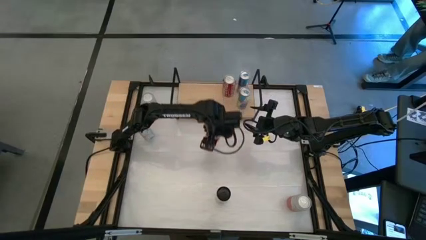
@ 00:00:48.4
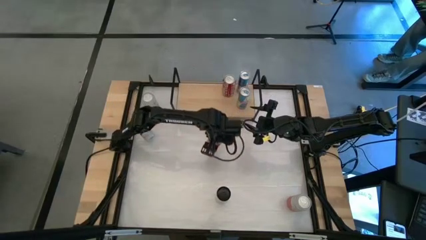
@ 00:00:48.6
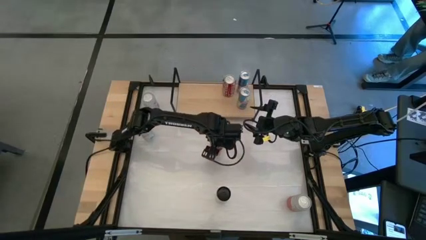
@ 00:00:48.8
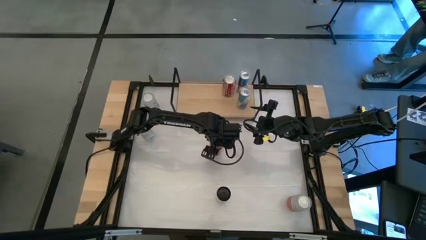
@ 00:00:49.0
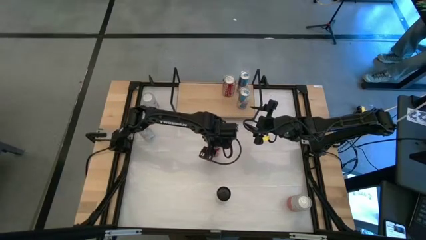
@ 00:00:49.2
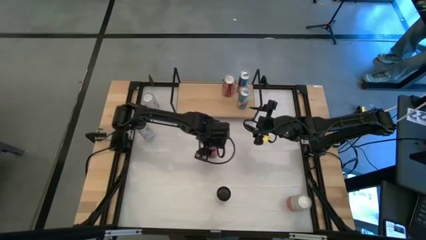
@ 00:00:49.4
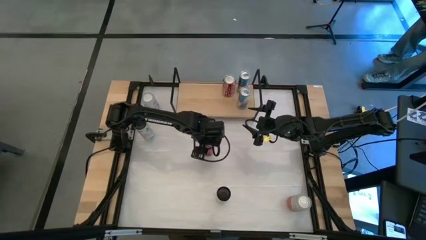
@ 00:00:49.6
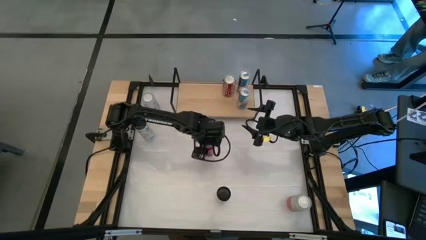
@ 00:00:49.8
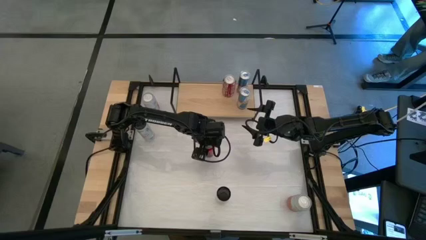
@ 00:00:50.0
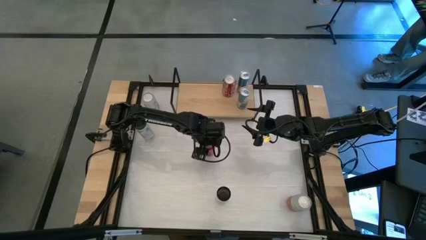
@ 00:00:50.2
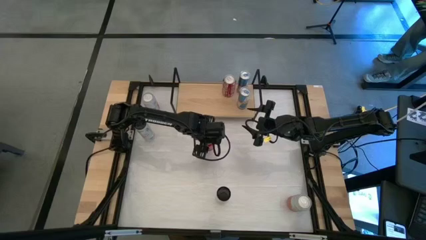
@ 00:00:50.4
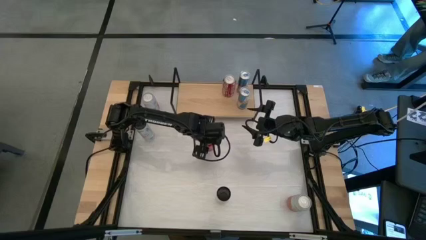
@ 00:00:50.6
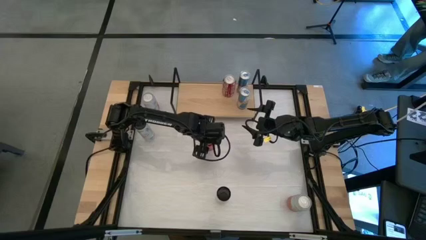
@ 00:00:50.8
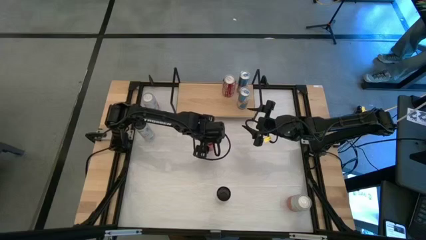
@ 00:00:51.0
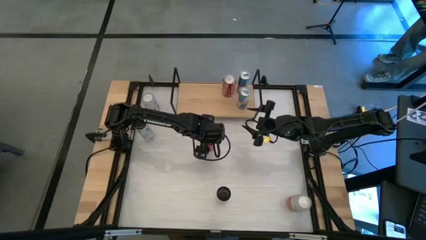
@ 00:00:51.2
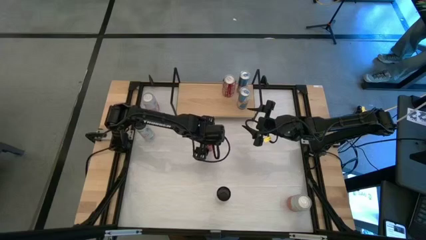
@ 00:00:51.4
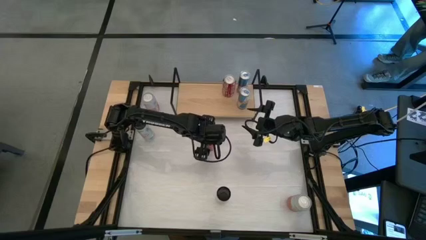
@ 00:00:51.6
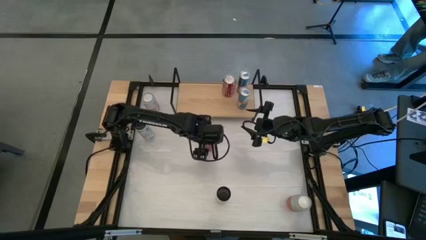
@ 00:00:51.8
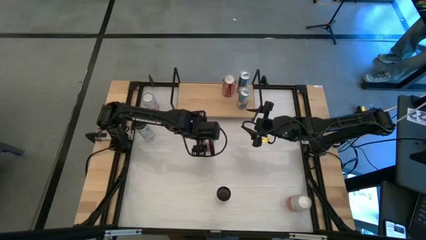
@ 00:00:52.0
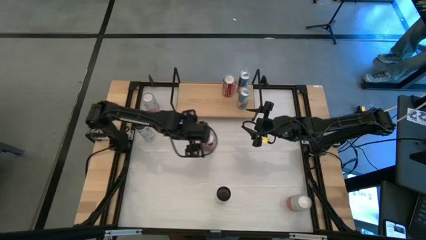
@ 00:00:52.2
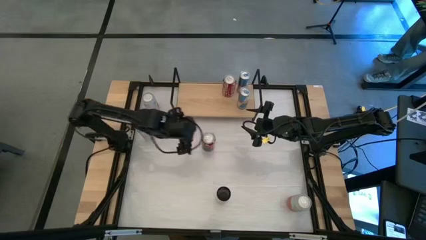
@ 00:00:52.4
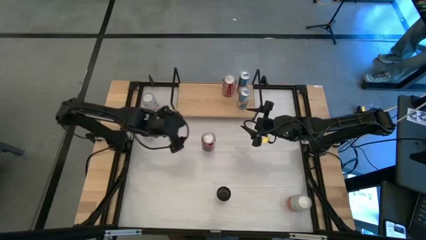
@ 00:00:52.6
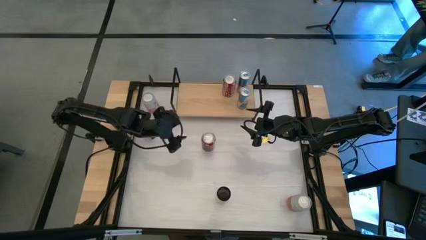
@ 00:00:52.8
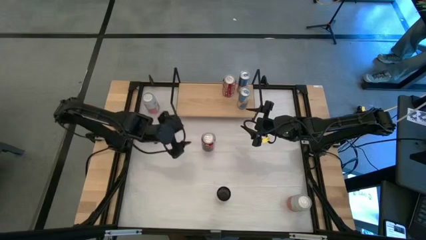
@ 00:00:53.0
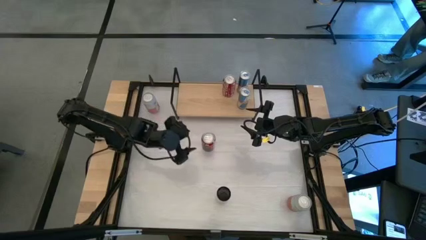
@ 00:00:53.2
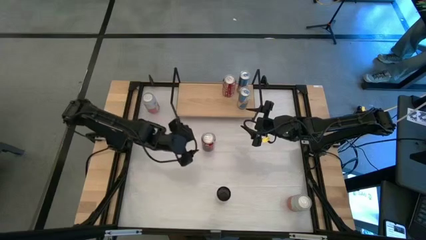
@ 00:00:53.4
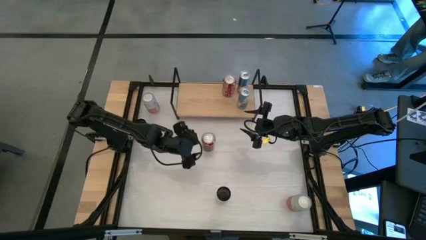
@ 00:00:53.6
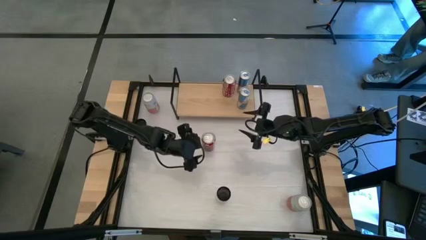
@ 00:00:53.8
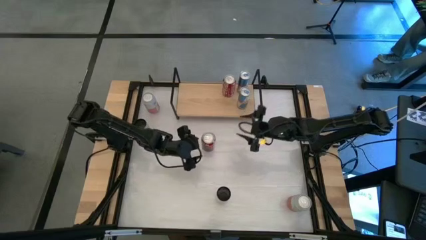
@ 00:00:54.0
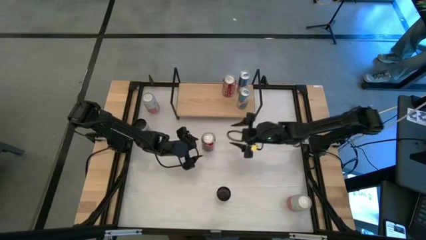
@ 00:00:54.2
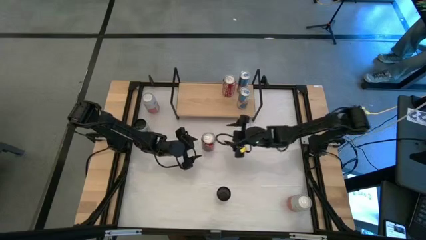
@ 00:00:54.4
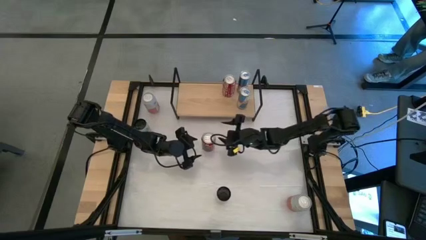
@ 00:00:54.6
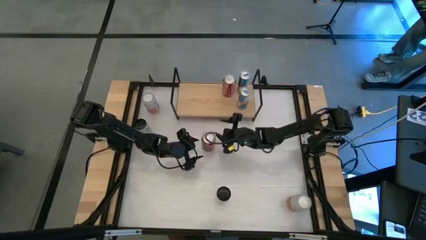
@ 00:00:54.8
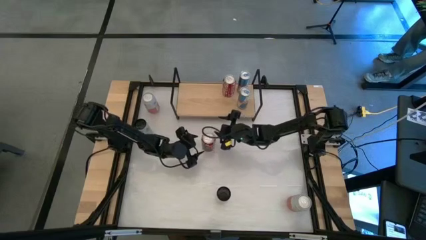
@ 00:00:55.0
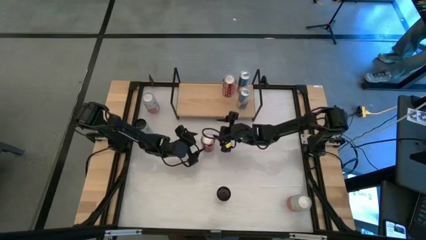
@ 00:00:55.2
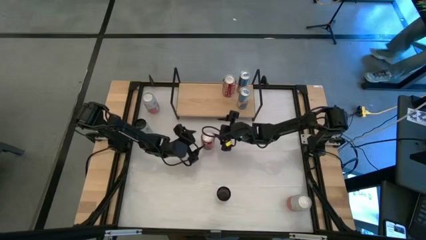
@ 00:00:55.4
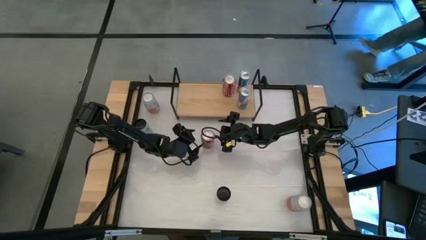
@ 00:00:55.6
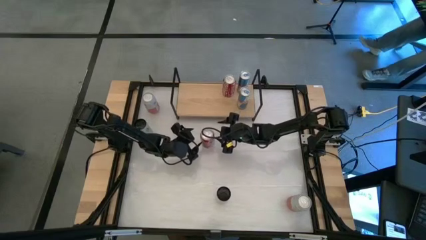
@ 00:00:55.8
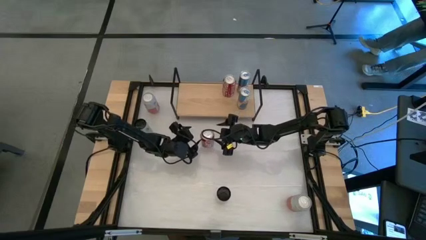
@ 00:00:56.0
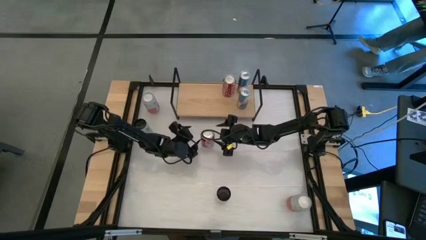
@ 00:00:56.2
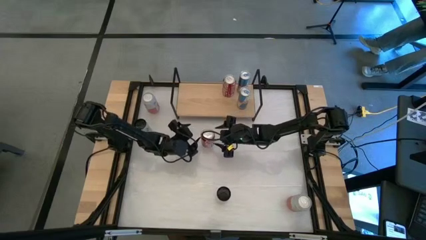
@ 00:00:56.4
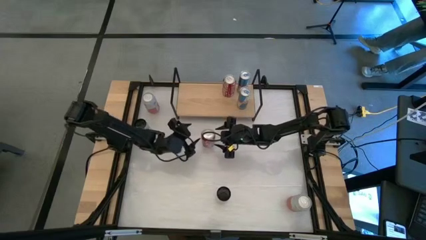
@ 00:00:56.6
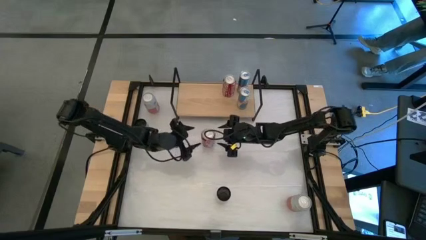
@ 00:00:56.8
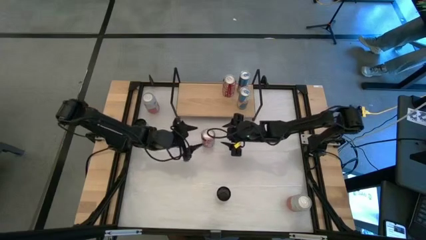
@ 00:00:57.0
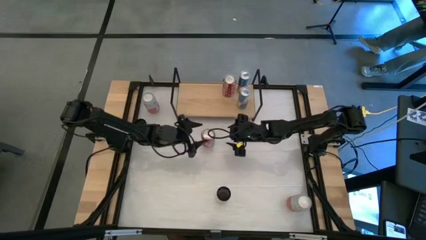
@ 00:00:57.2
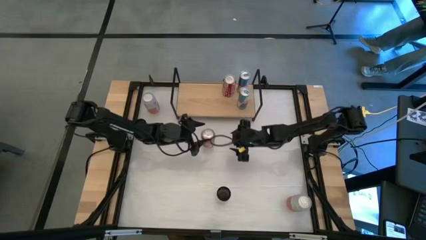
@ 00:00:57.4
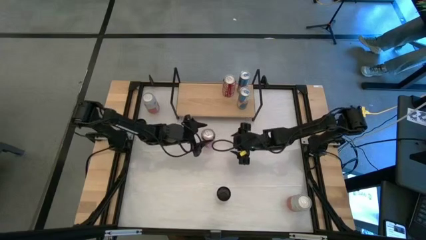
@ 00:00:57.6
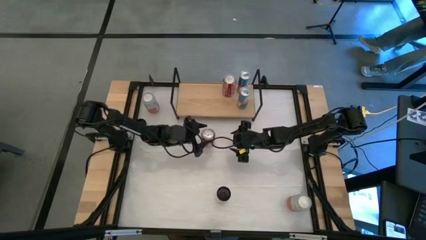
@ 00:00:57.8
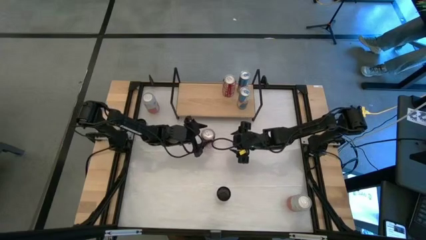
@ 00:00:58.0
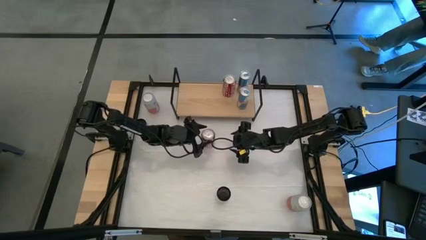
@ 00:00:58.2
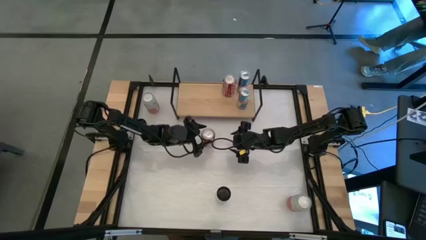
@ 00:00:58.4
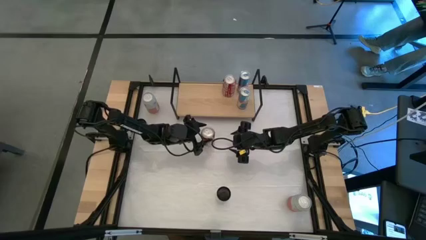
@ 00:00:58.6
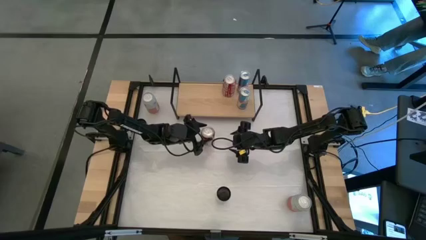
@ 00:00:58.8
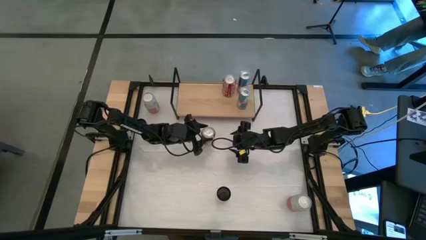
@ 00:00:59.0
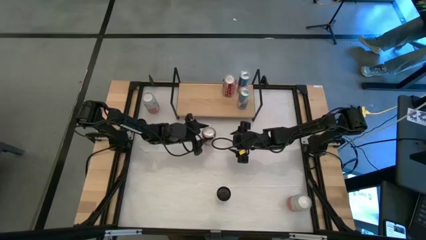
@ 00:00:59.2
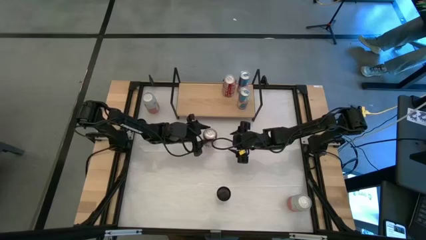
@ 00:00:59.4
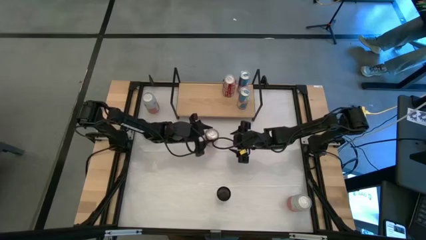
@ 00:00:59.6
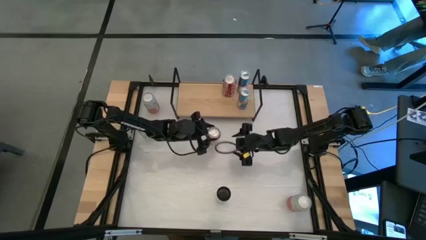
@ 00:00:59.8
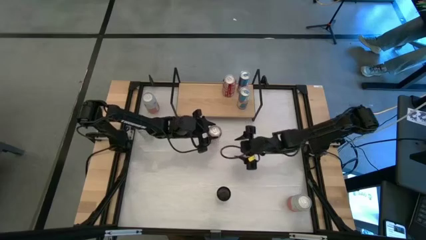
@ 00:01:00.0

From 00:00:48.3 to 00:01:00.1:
Task: Place canned beverage on shelf
Put the red soda can on the shelf

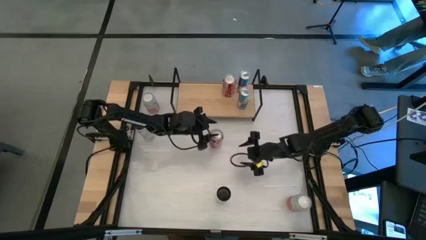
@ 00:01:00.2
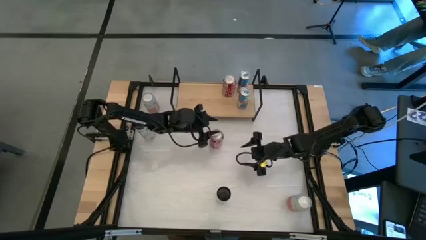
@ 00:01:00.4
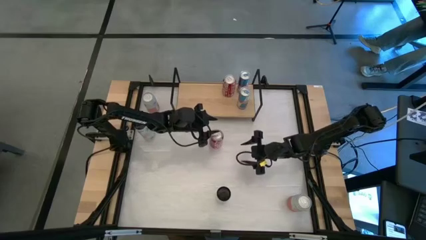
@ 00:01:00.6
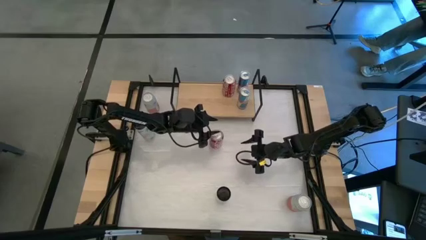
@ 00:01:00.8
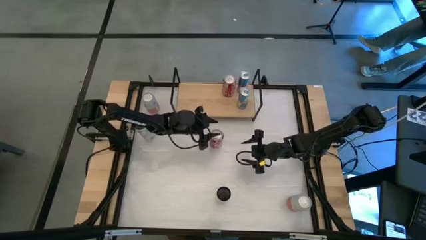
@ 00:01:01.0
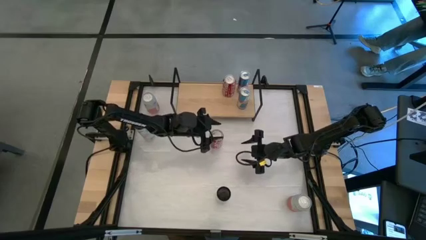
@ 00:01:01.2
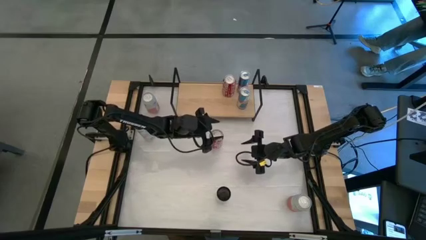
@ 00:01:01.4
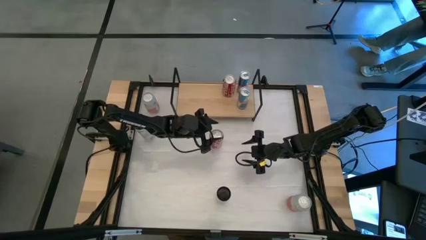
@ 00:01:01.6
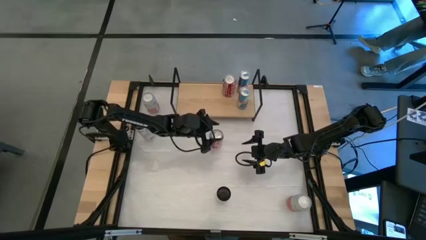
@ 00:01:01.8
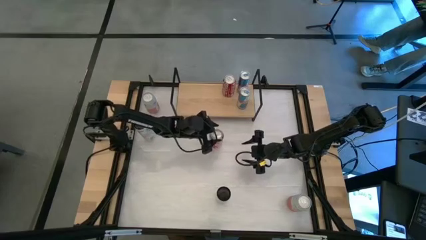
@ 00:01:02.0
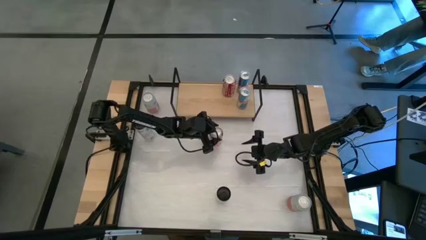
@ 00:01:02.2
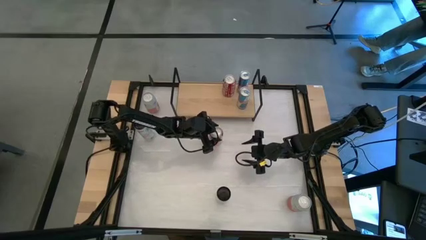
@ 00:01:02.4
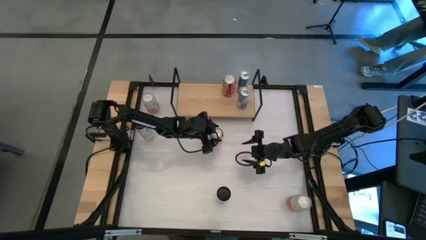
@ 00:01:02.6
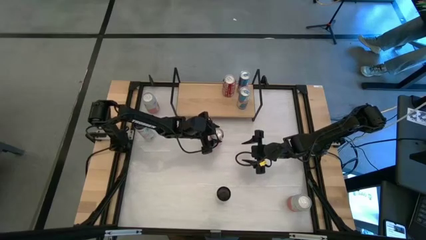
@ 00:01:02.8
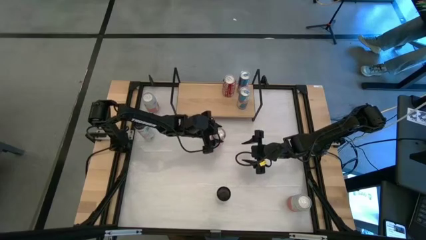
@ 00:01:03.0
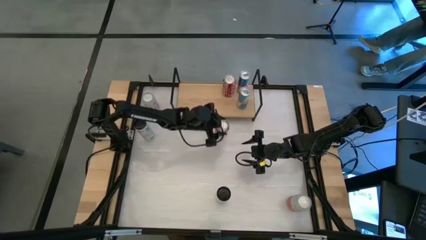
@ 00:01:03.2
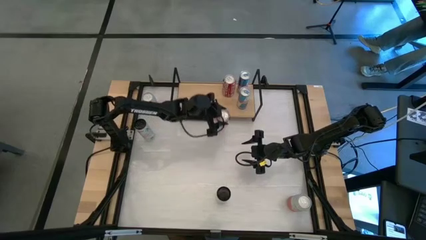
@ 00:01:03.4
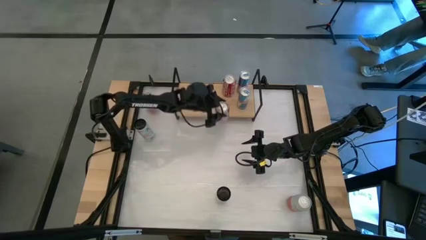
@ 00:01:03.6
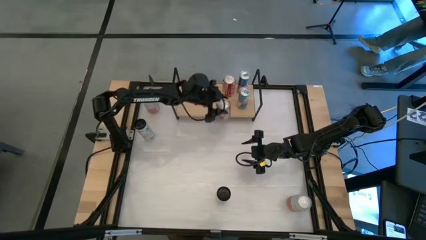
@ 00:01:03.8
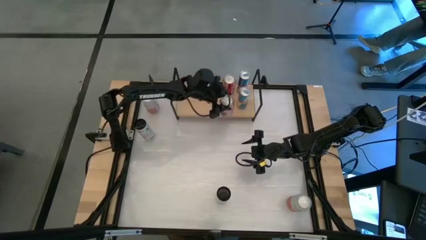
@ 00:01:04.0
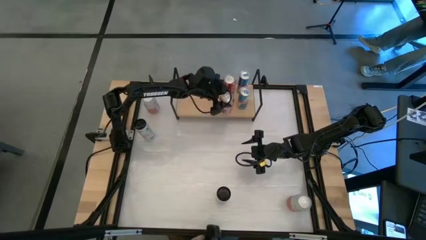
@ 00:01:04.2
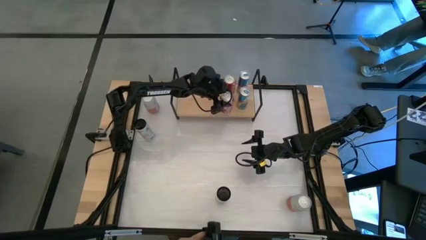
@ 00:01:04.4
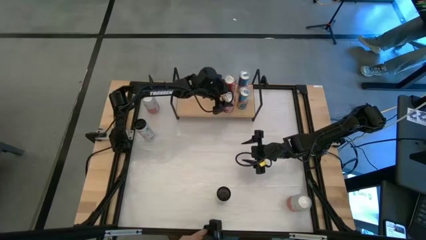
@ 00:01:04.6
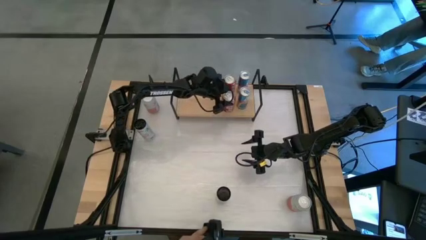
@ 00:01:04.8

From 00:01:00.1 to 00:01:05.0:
Put the red soda can on the shelf
